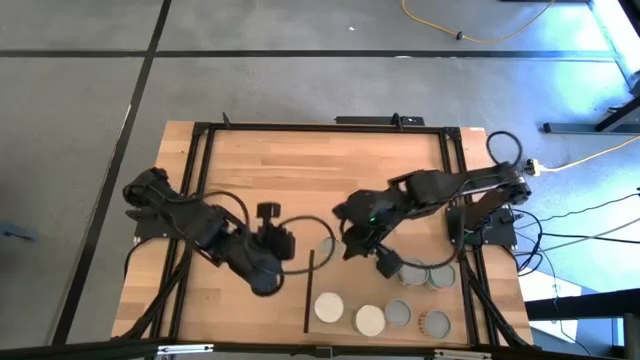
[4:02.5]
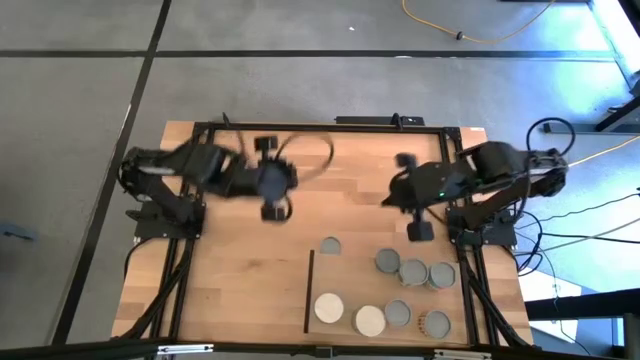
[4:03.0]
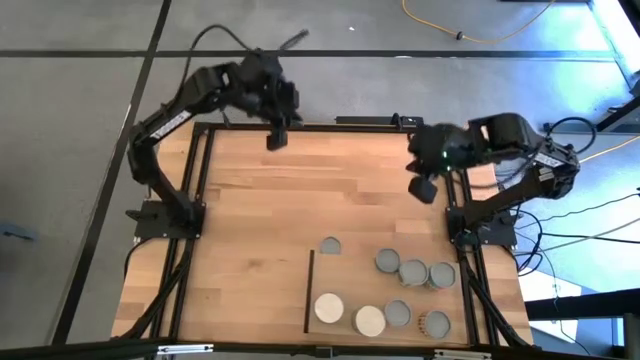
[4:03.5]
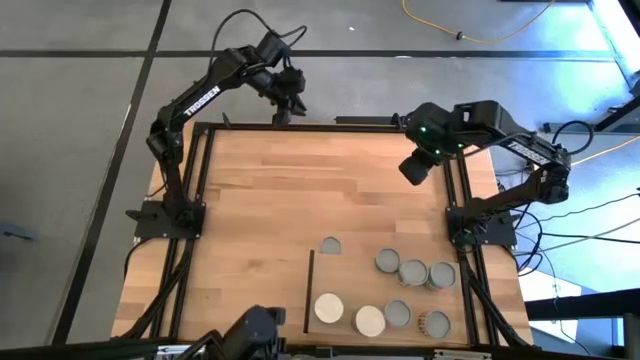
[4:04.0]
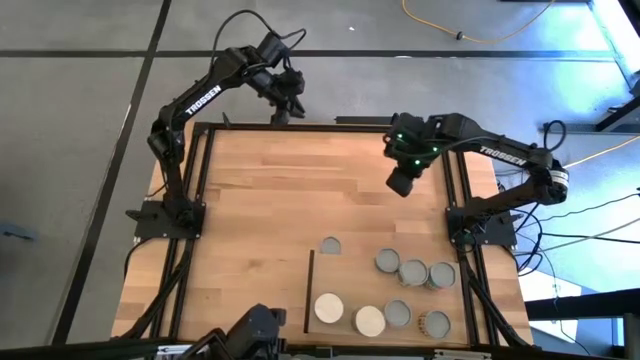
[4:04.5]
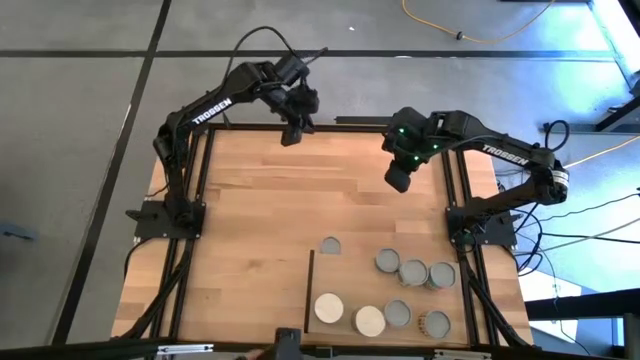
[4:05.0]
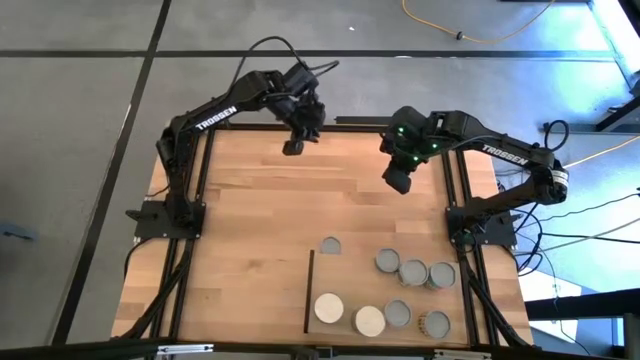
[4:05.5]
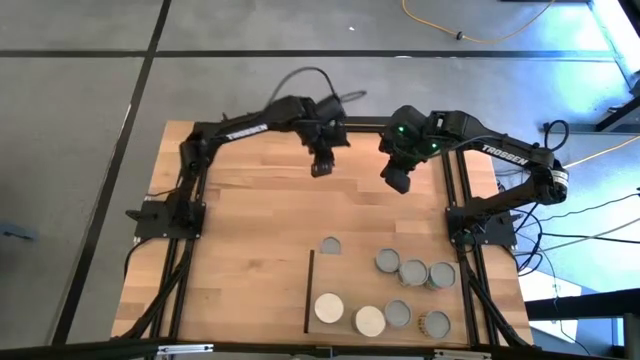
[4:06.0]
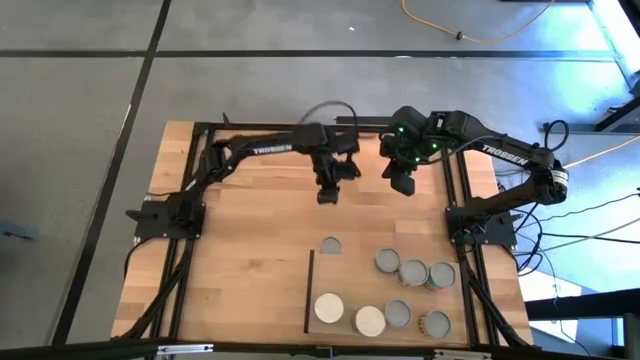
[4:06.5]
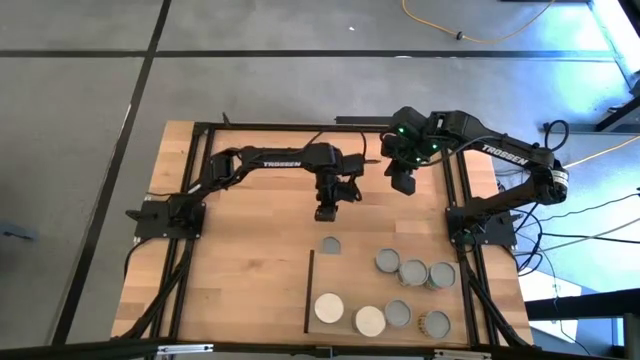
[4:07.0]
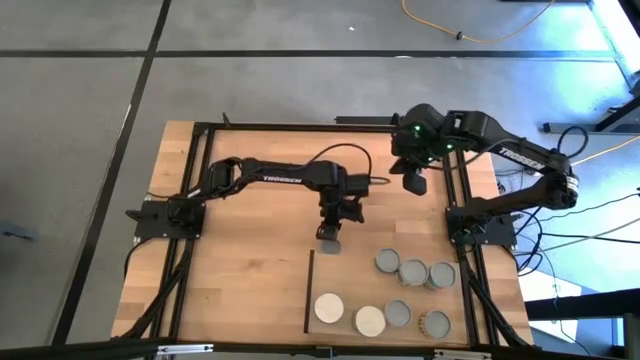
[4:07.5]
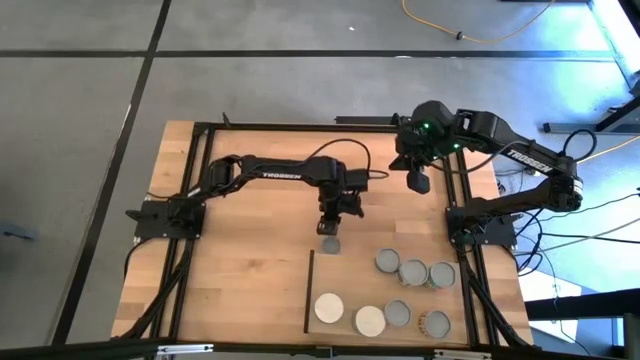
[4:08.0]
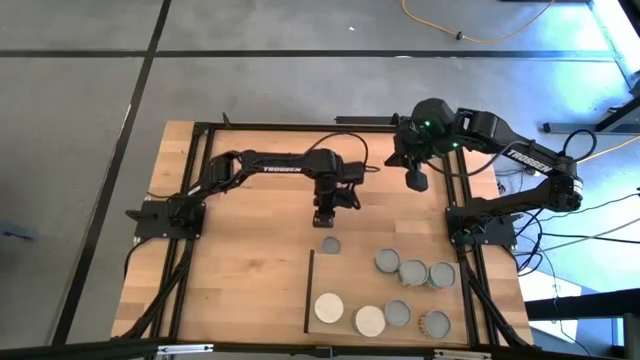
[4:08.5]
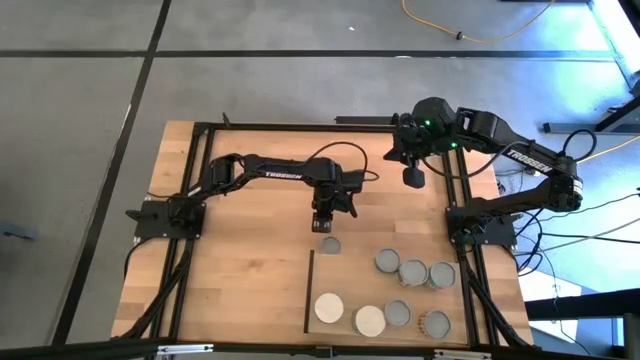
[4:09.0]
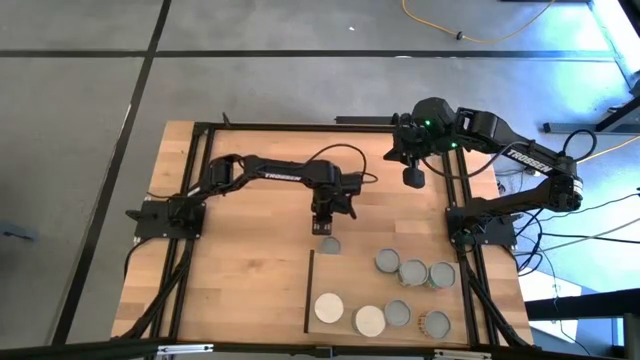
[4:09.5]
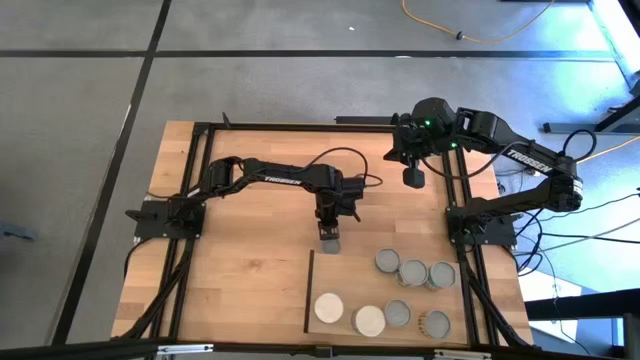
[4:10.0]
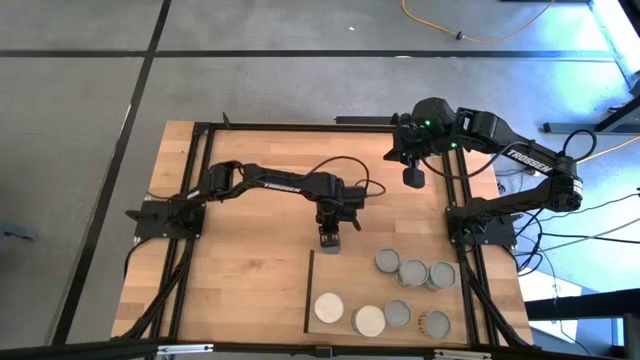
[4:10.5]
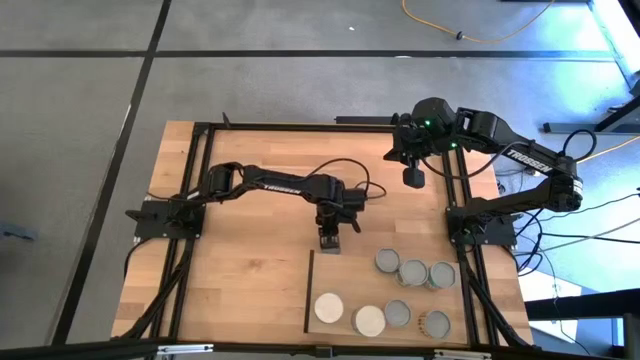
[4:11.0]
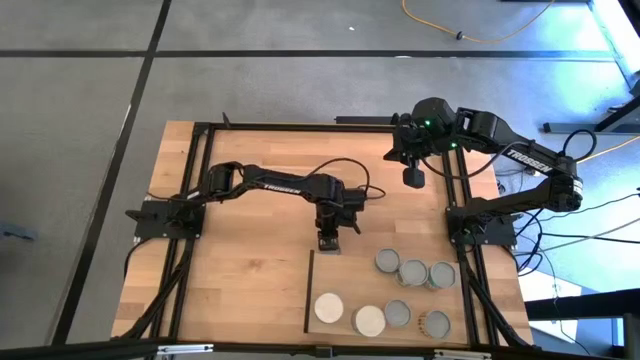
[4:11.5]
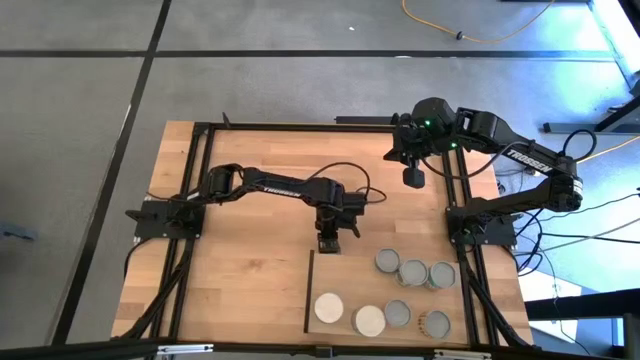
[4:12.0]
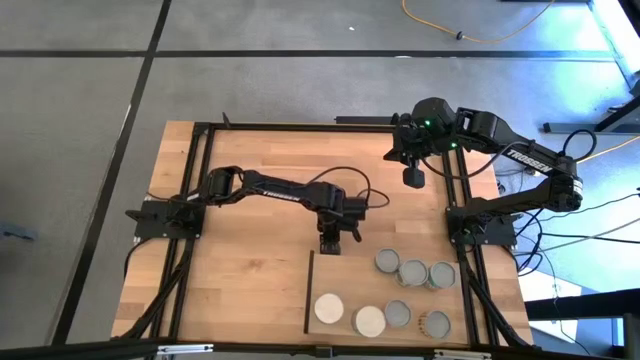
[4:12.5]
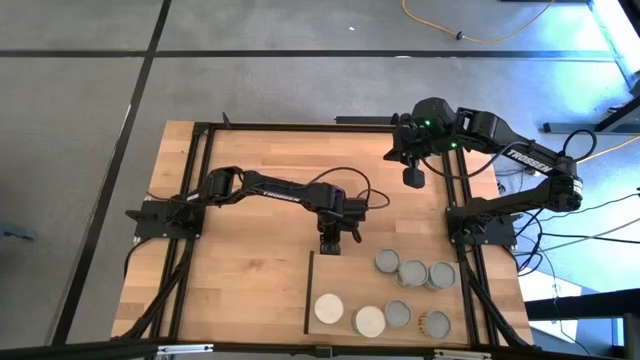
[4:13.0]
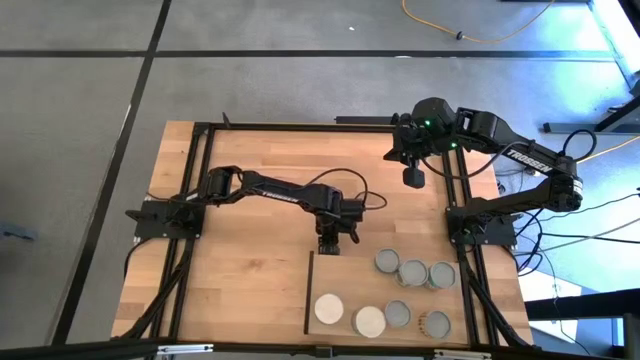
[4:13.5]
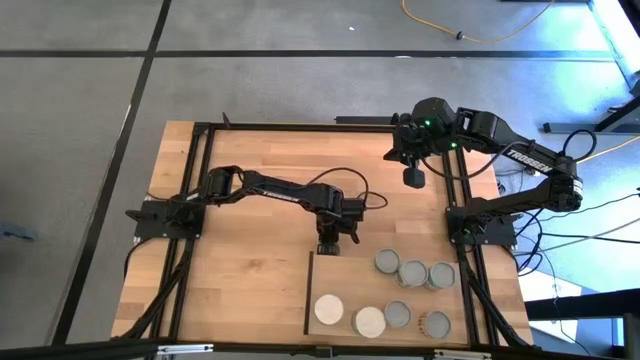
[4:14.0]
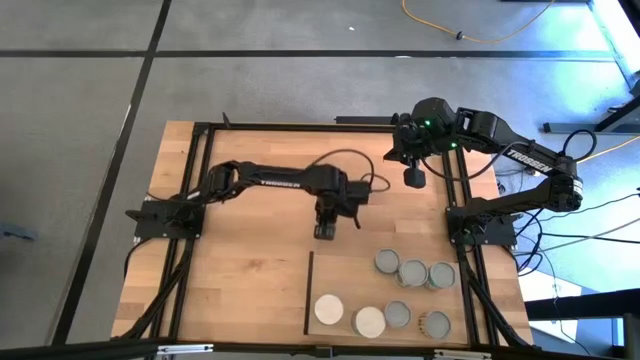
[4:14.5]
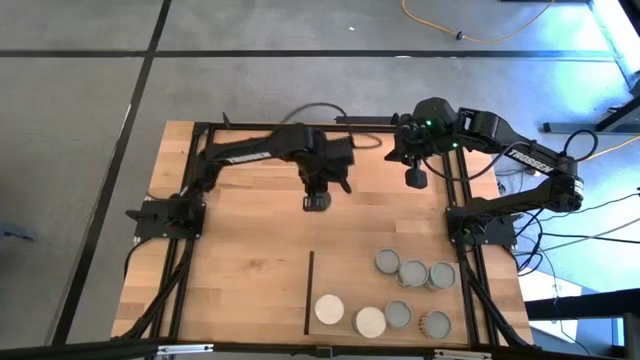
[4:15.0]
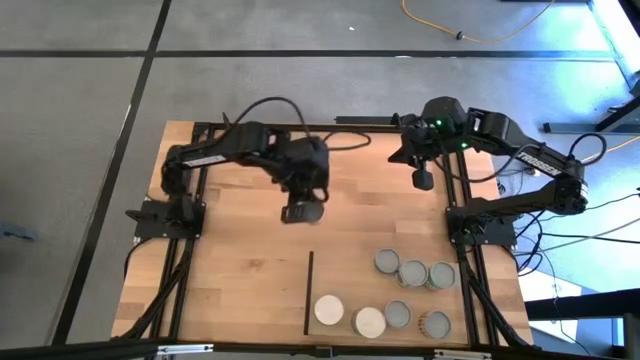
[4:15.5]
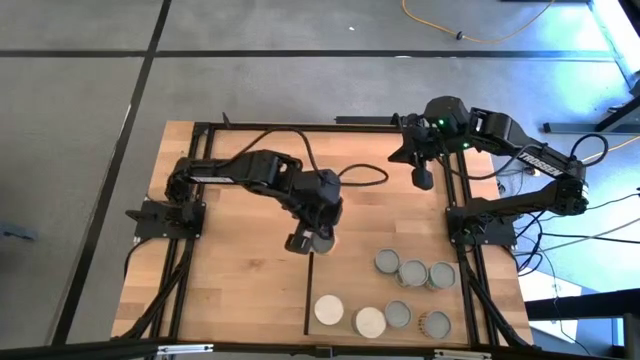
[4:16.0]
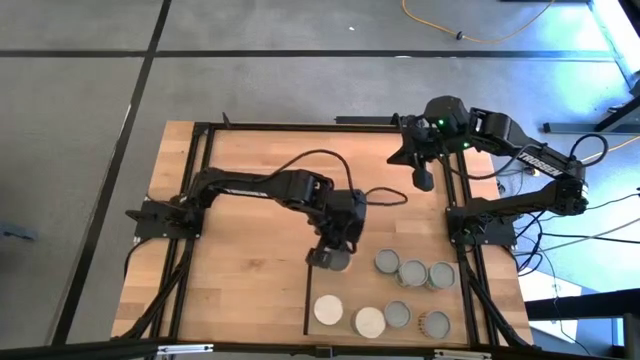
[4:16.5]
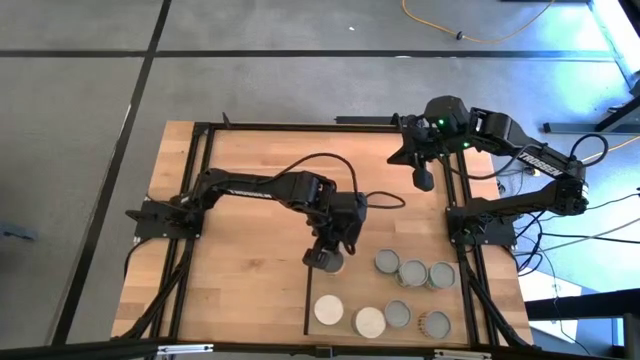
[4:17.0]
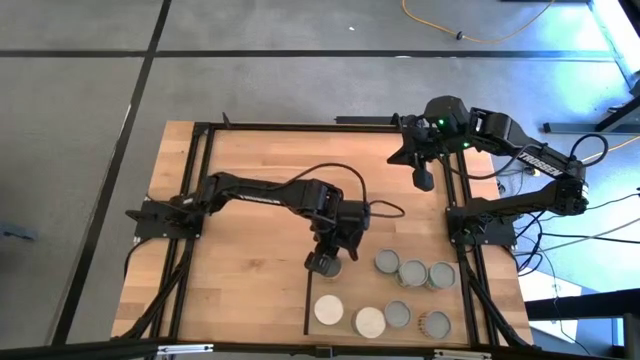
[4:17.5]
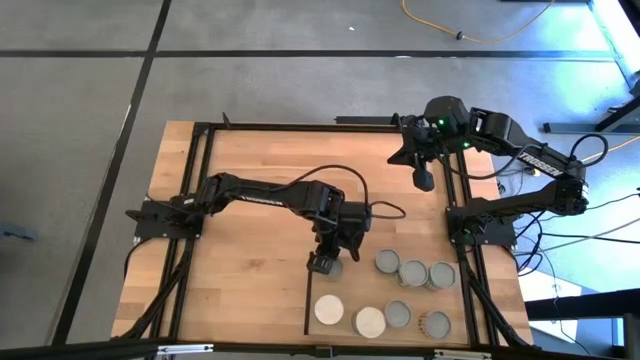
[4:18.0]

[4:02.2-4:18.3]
Task: Pick and place cans onto a shelf
Put the yellow canned mushroom on the shelf aligned with the other blue canned cherries

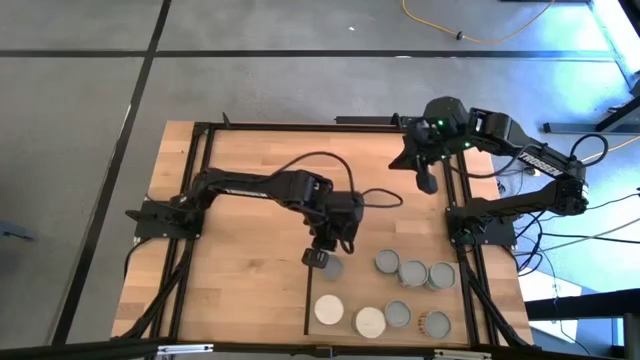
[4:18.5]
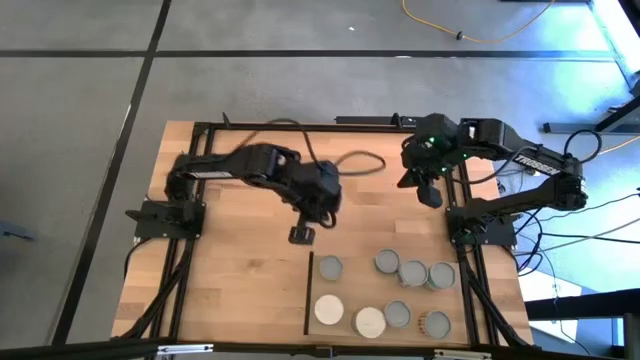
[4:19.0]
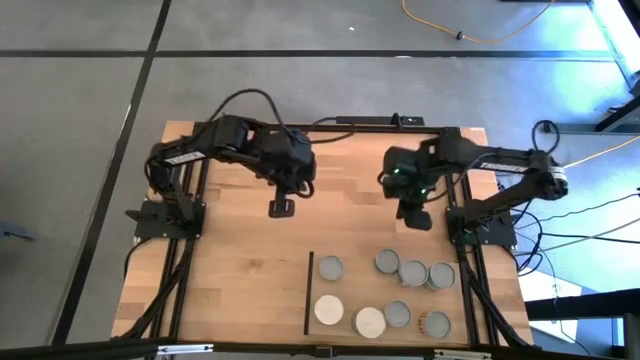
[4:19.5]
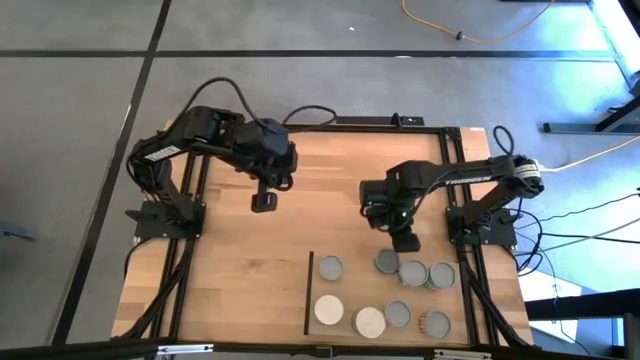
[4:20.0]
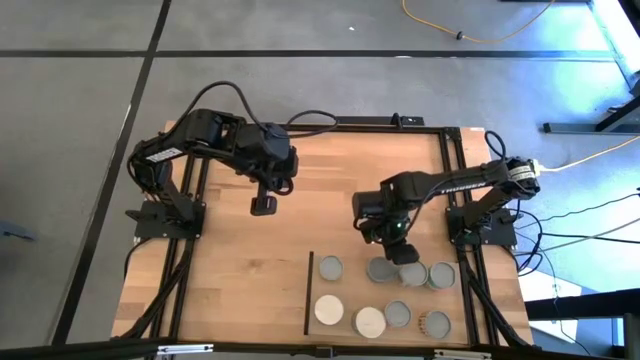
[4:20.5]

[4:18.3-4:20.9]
Adjust the green tuna can on the shelf

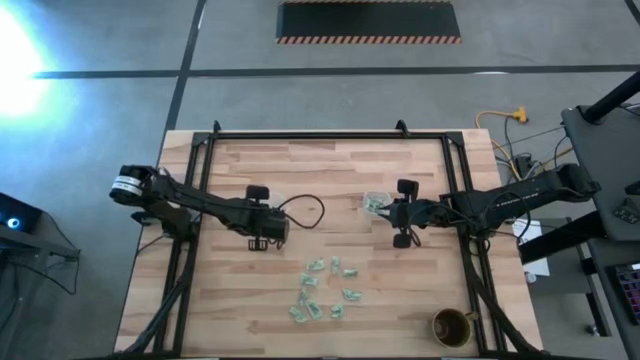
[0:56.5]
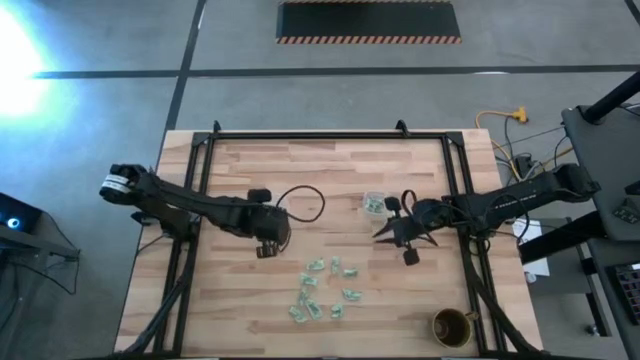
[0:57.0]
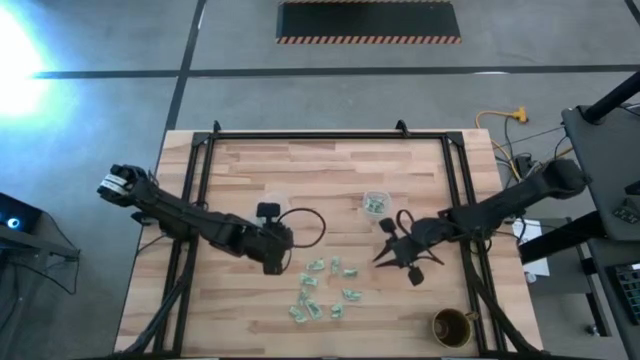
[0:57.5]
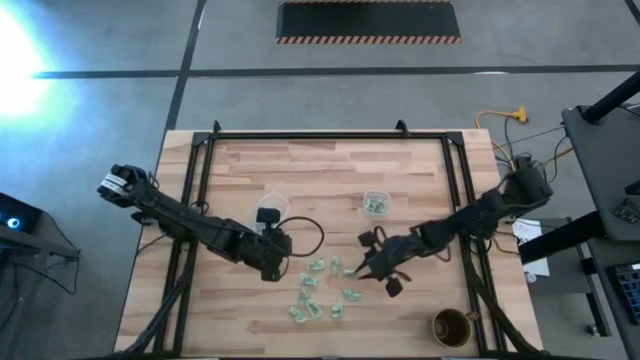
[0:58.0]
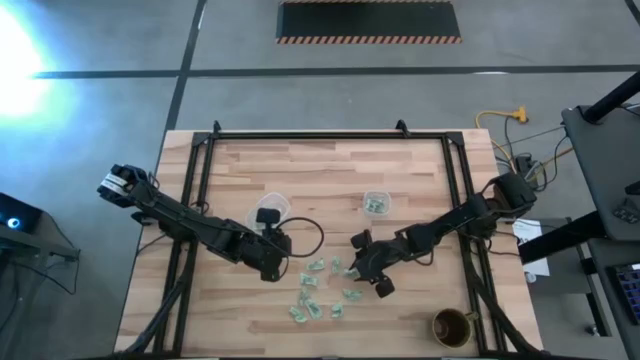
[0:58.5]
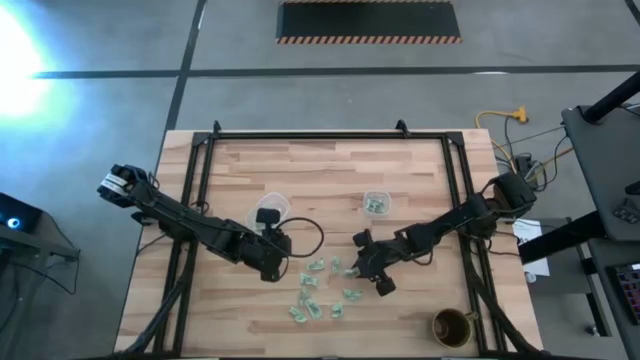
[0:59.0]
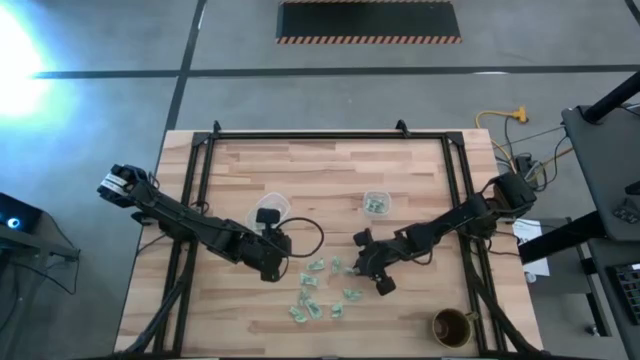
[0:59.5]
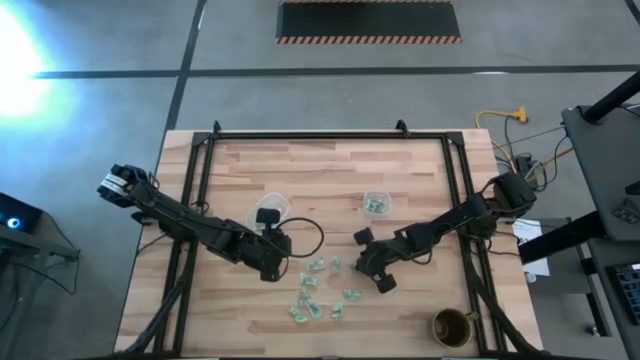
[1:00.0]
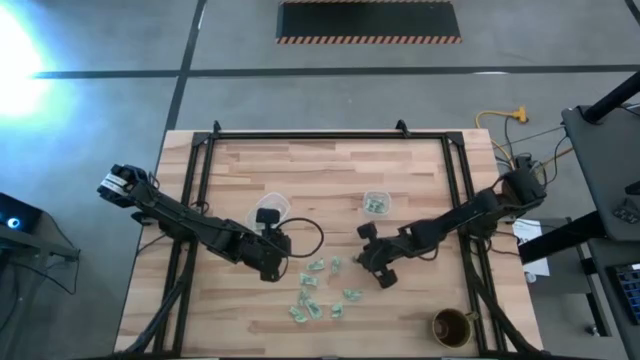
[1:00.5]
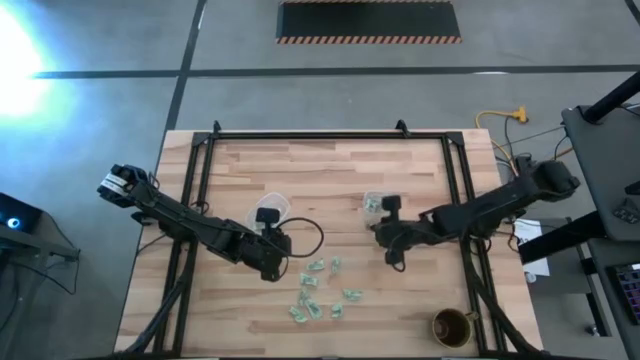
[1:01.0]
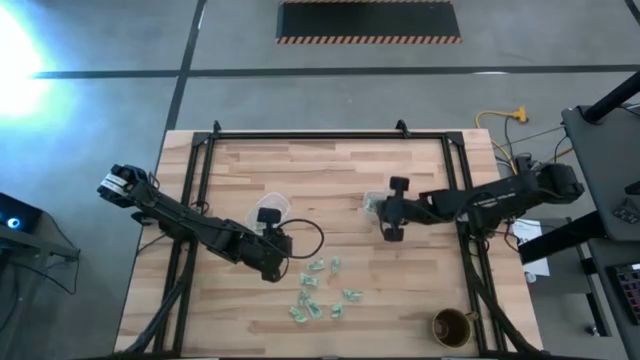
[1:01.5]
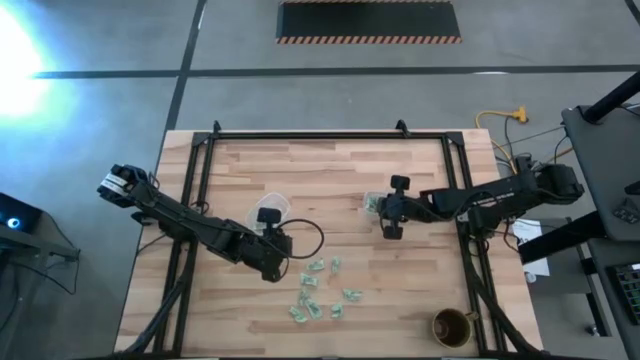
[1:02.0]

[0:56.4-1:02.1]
Task: Pick and place Stevia / Truvia into bins
Put the light green stevia packet into the right transparent container
